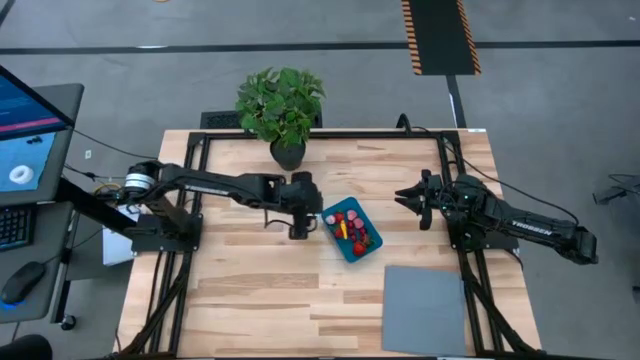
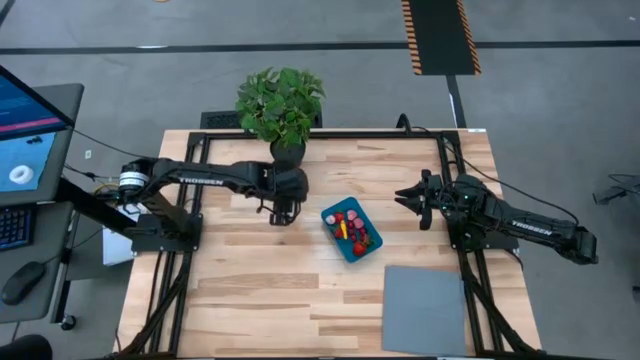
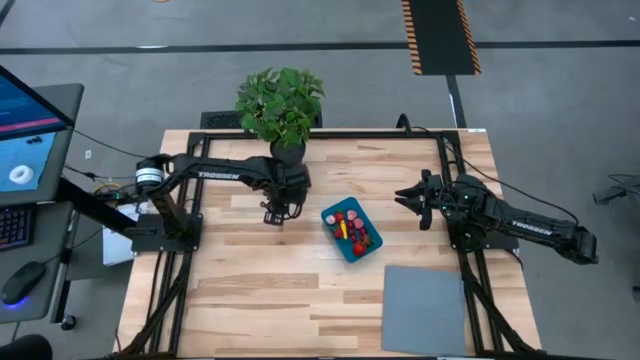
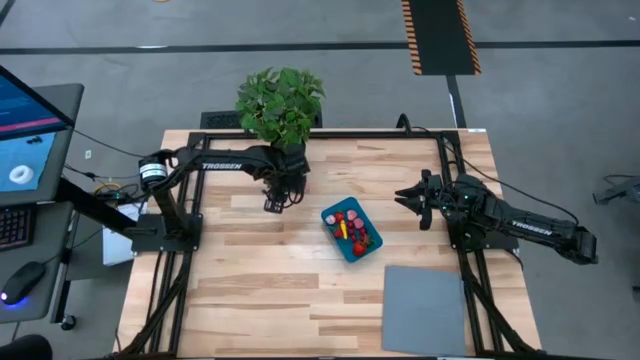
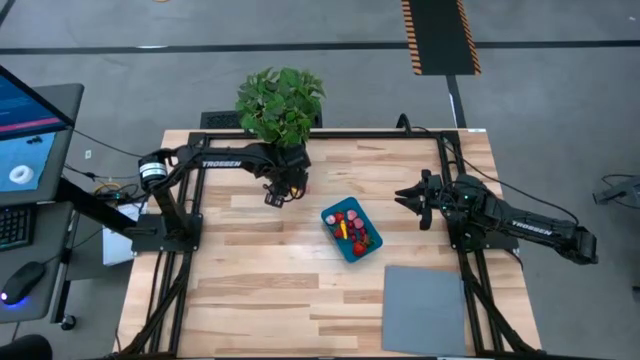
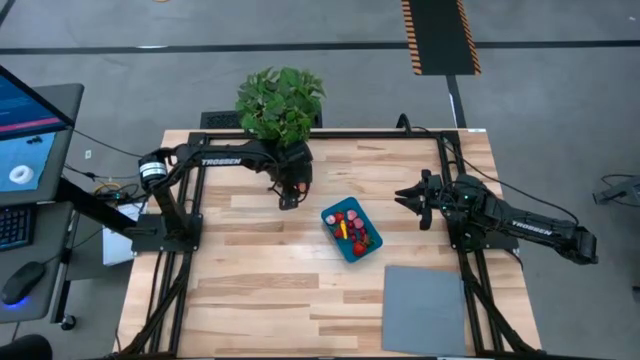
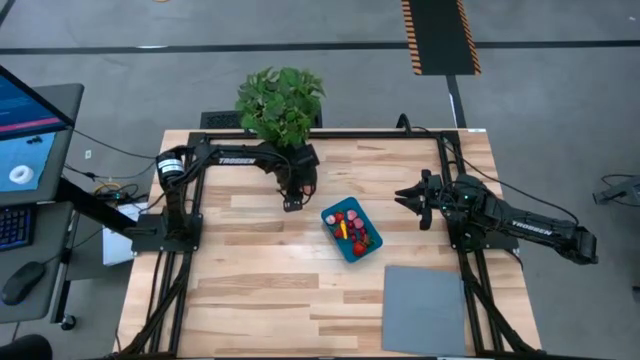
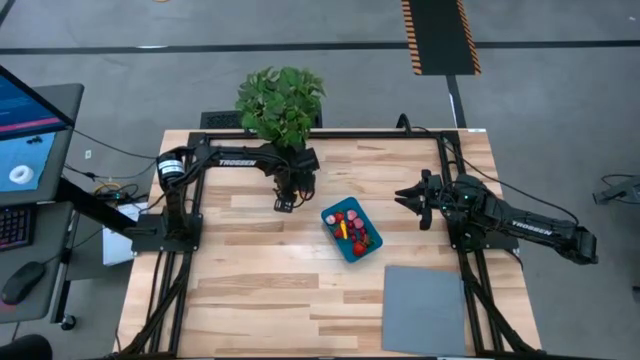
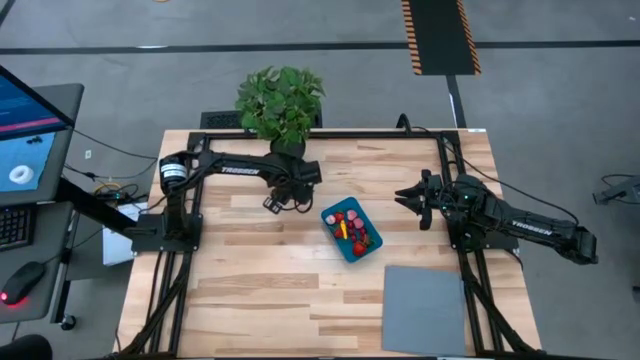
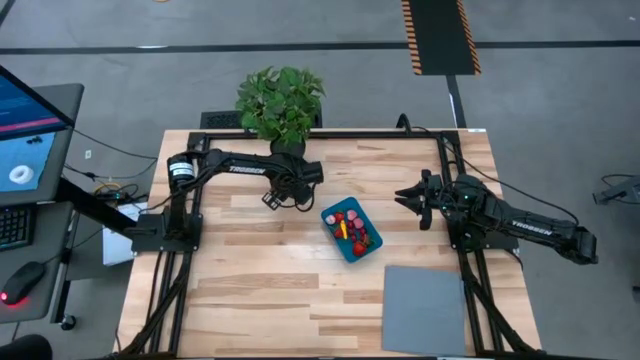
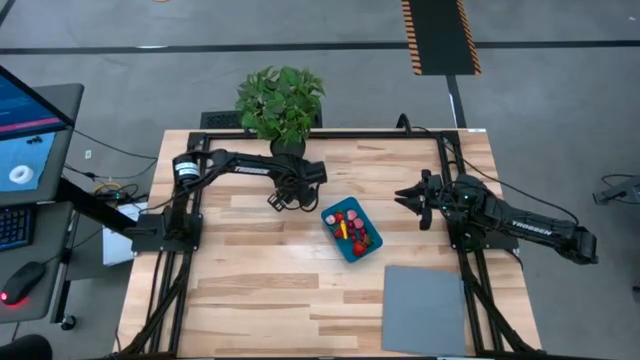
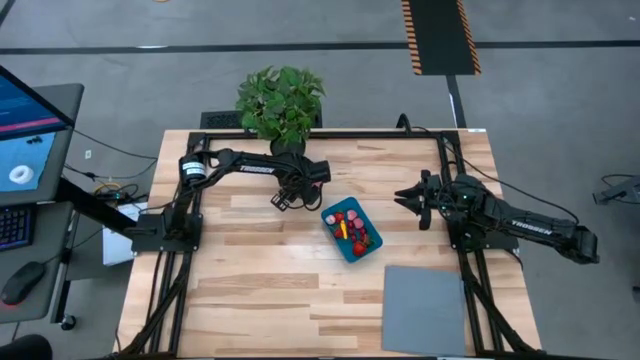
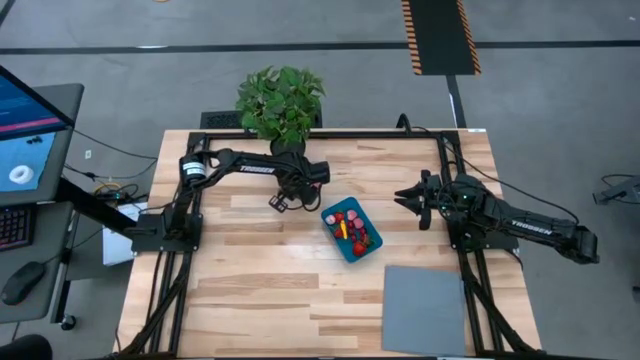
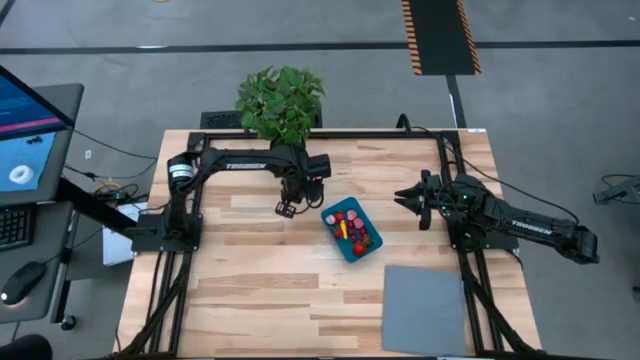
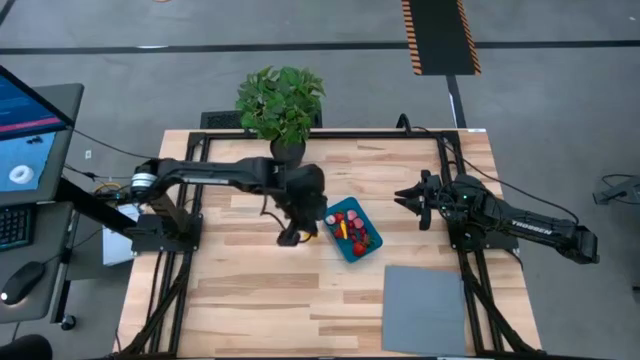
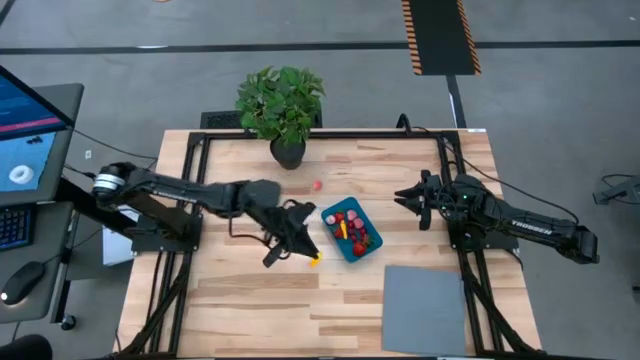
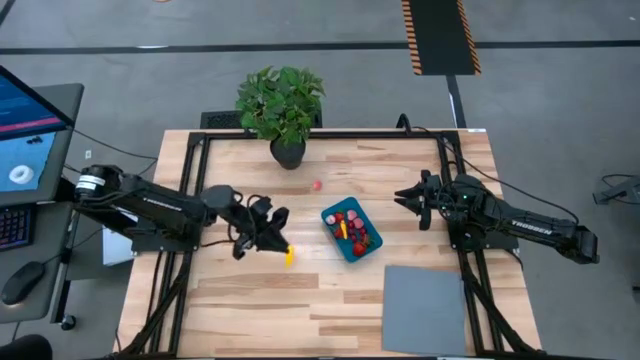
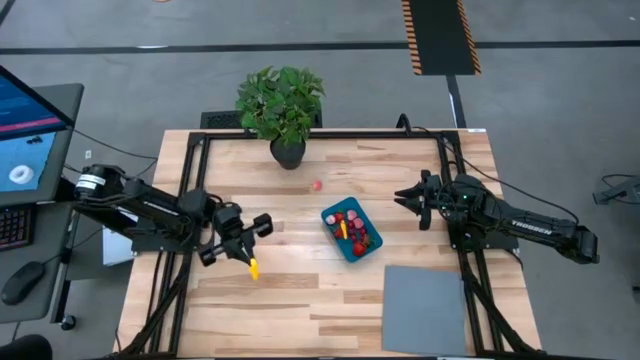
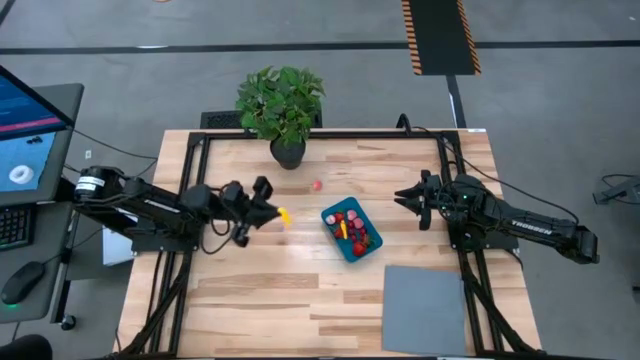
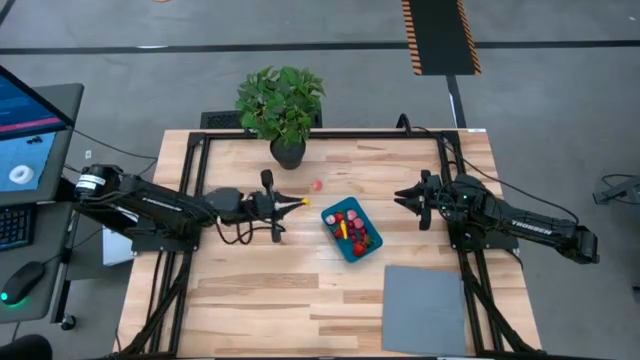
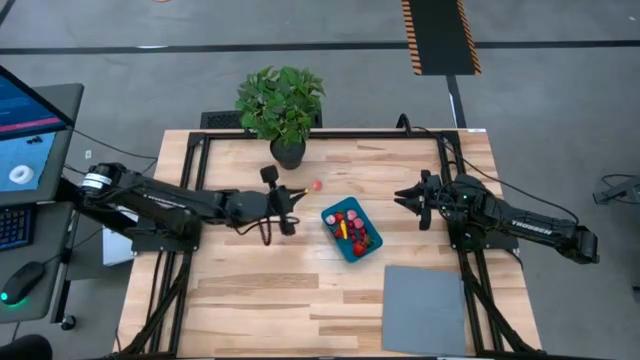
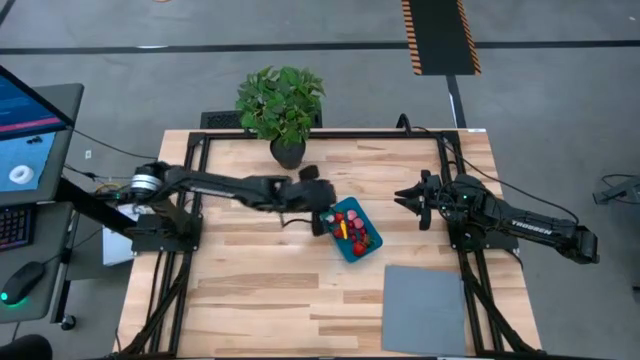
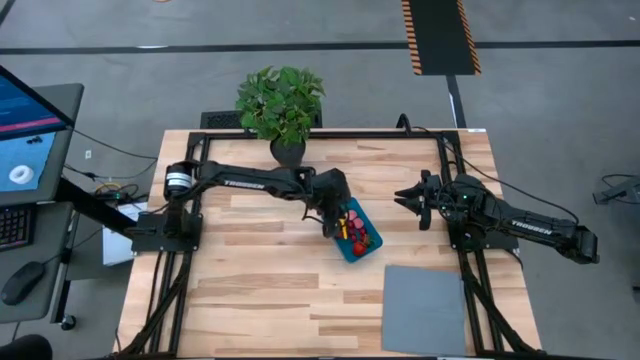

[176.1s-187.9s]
Task: Pick and placing Produce into tupperware
Put the corn into the blue bin

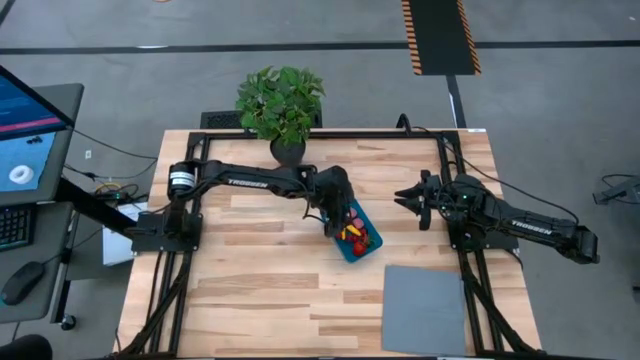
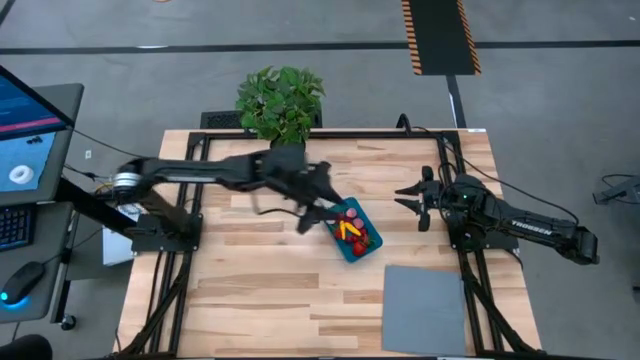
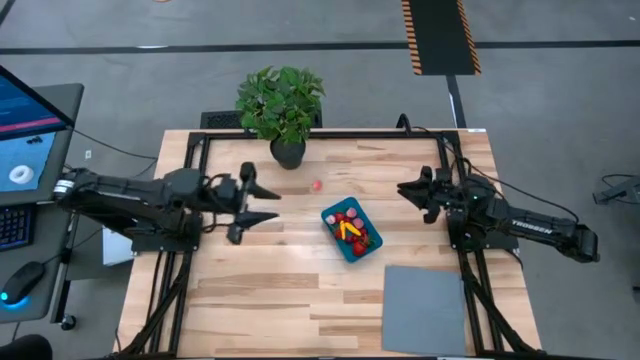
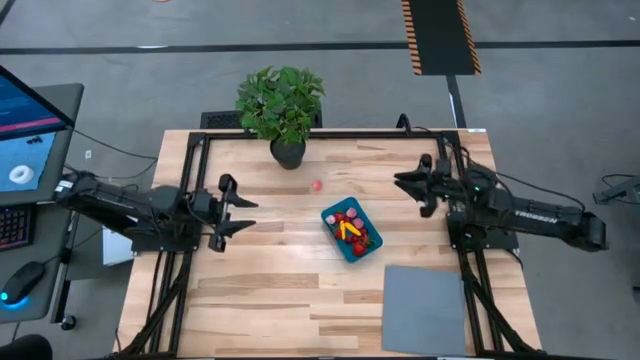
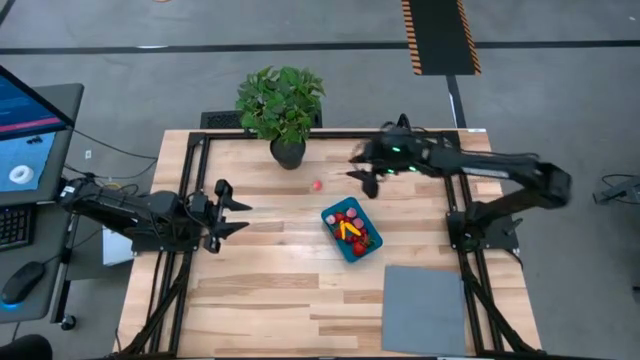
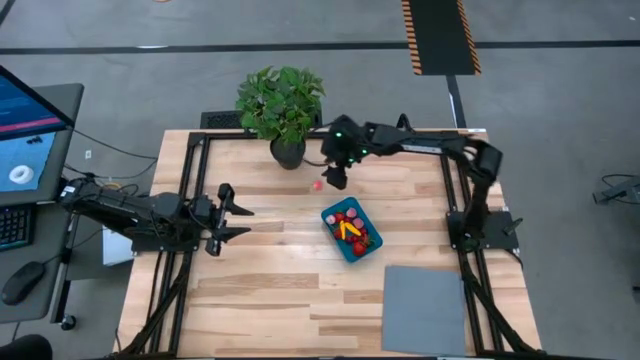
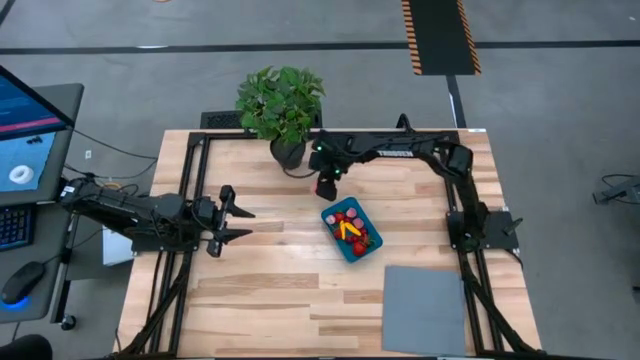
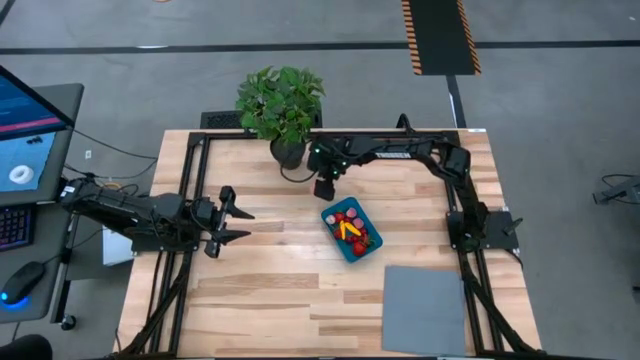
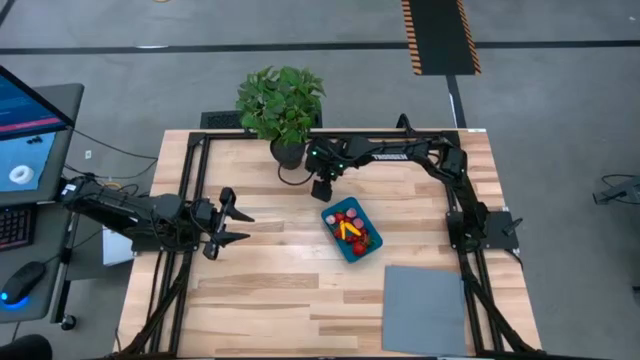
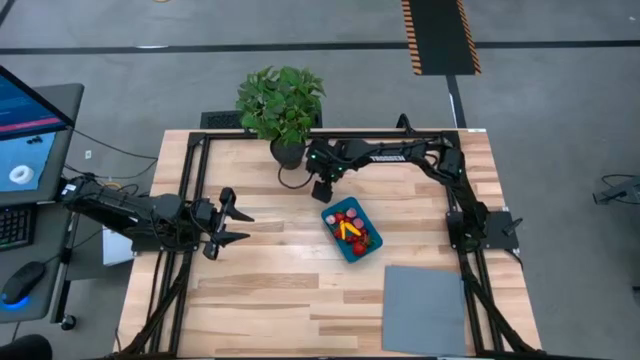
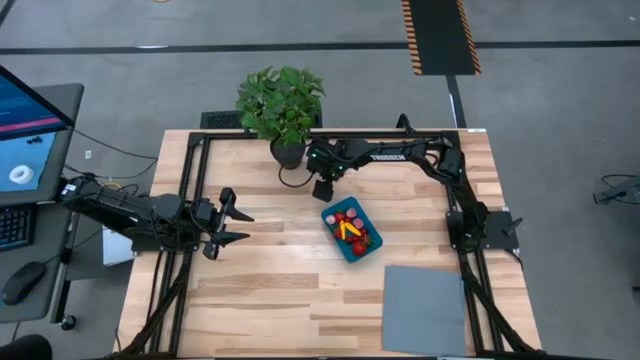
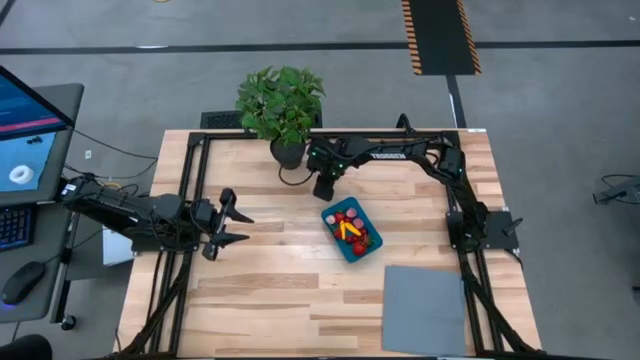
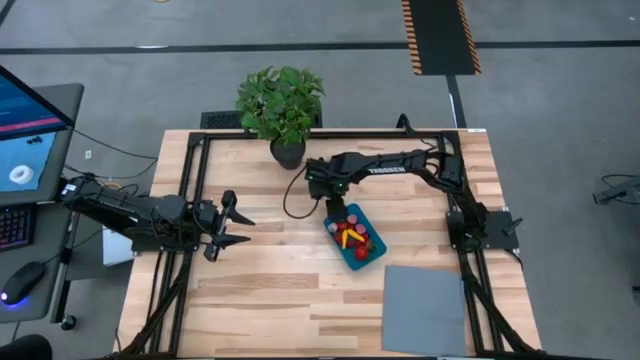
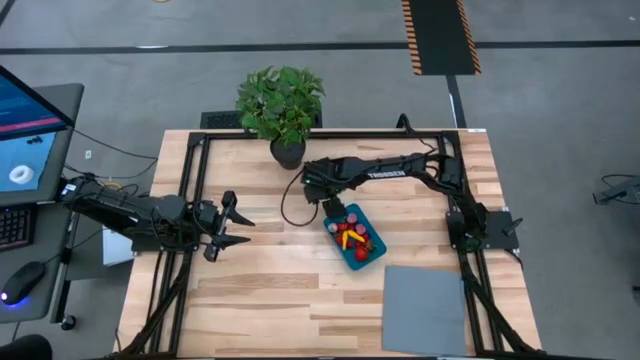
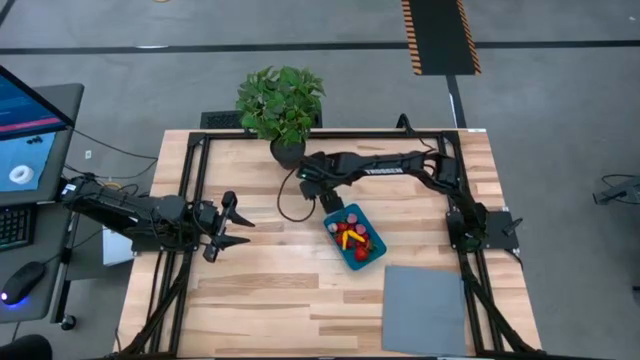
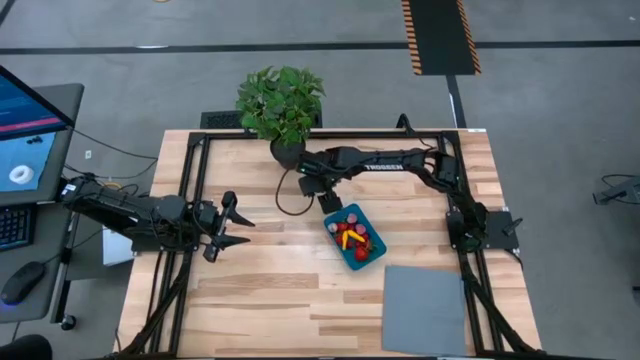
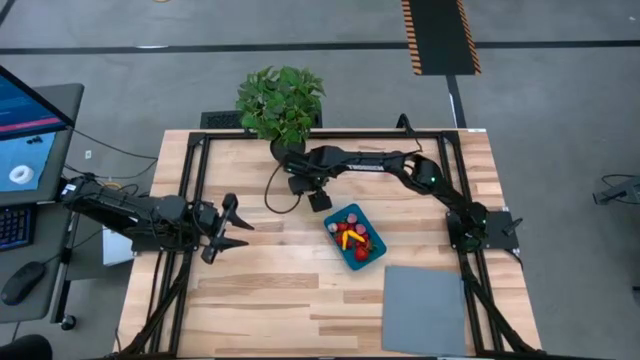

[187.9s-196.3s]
Put the apricot into the blue bin

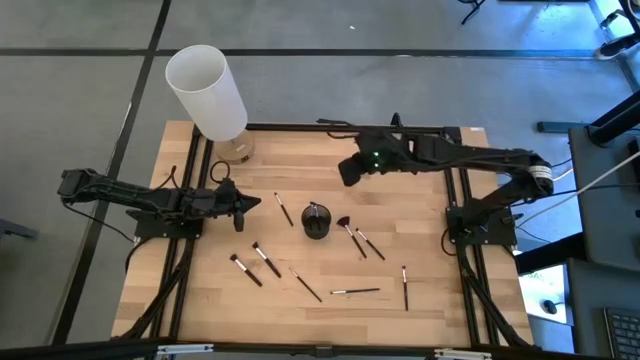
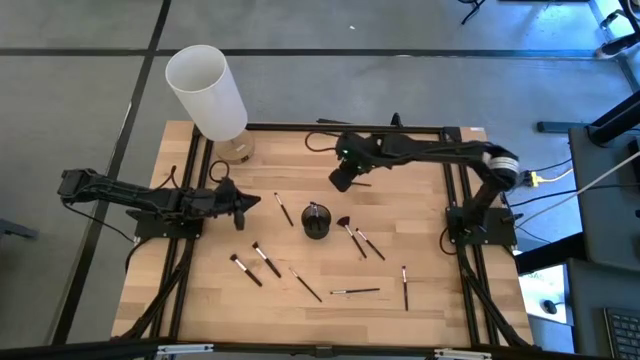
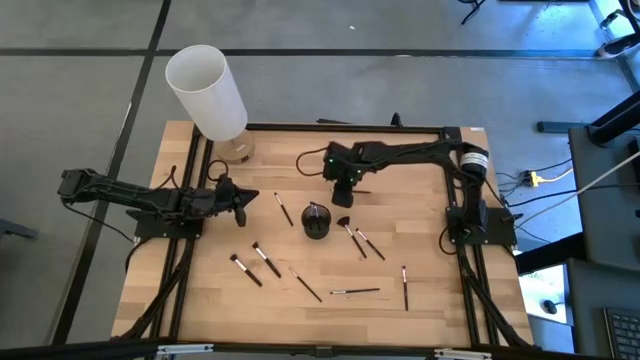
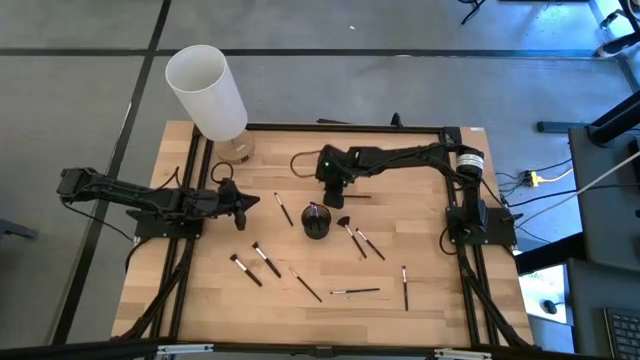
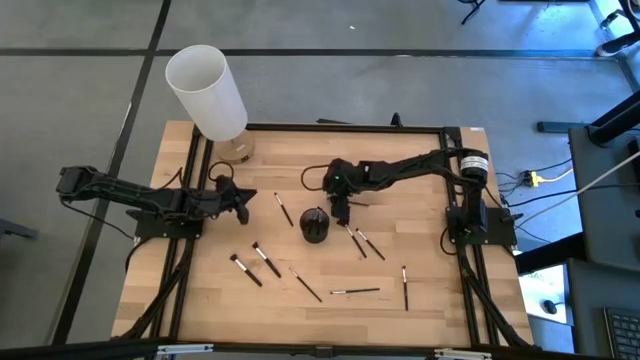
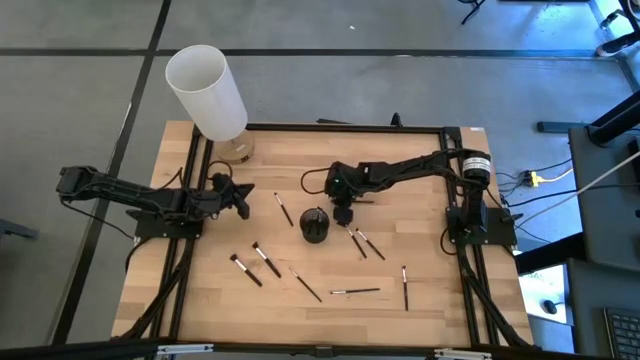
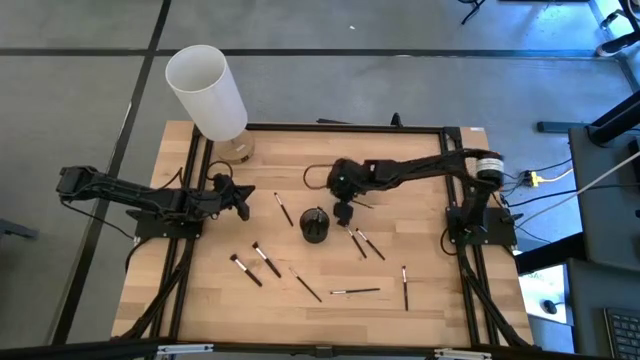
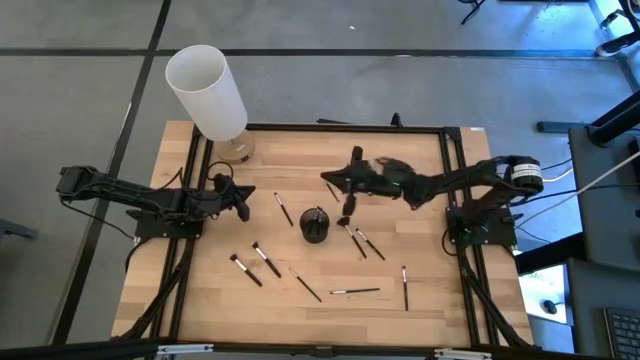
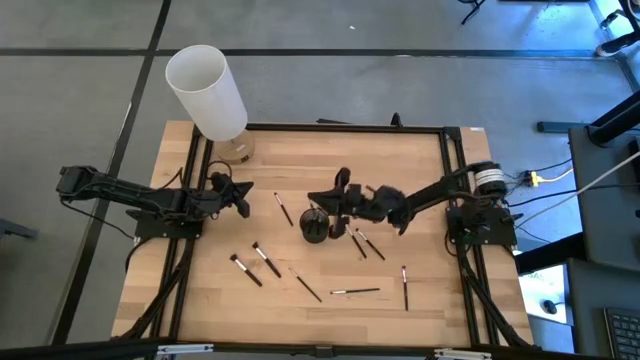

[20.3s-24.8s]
Task: Sort items
Put the silver eyeshadow brush into the pen holder
